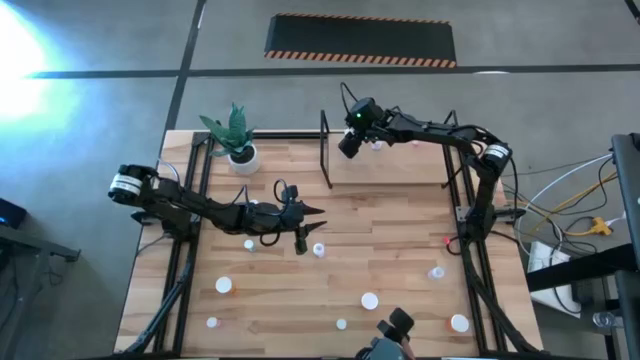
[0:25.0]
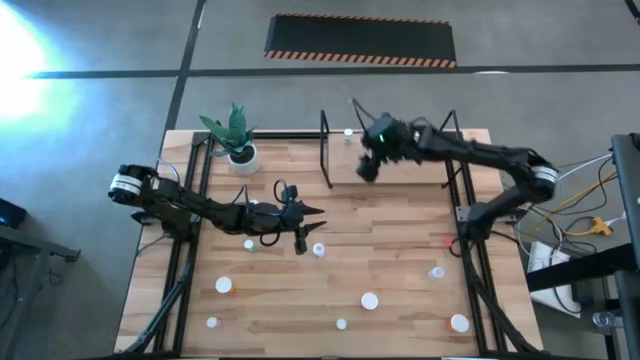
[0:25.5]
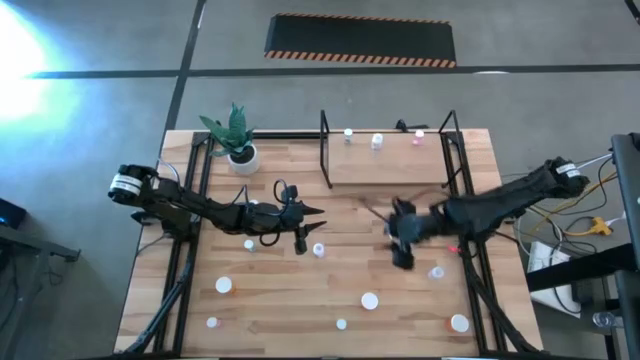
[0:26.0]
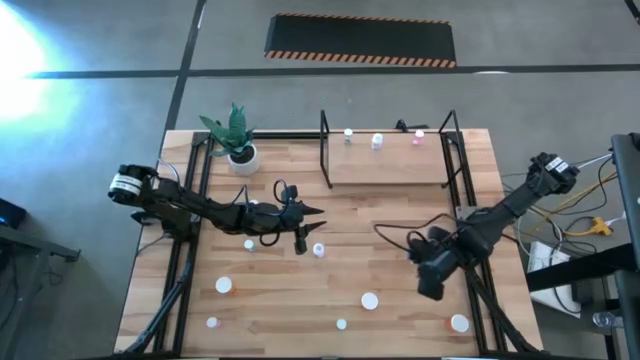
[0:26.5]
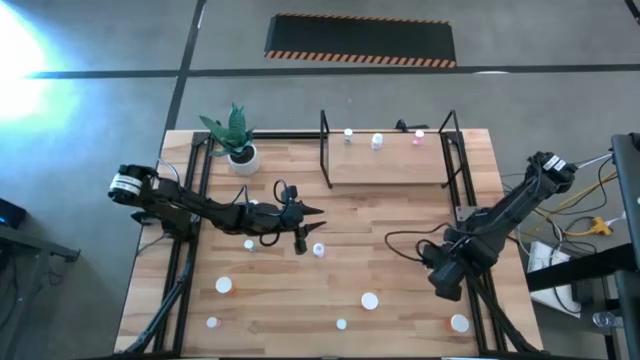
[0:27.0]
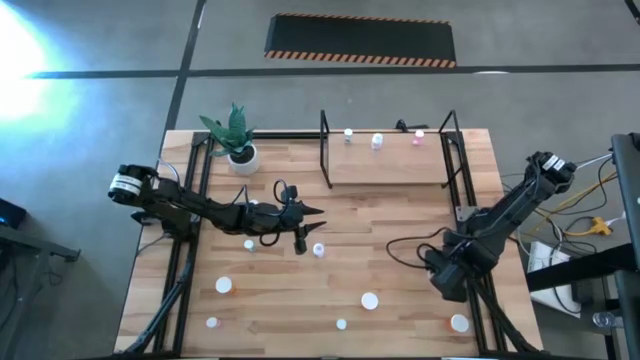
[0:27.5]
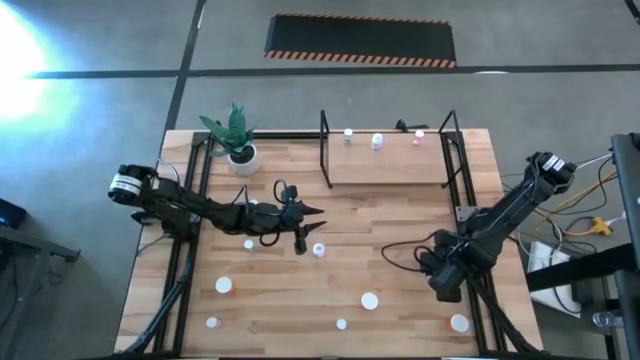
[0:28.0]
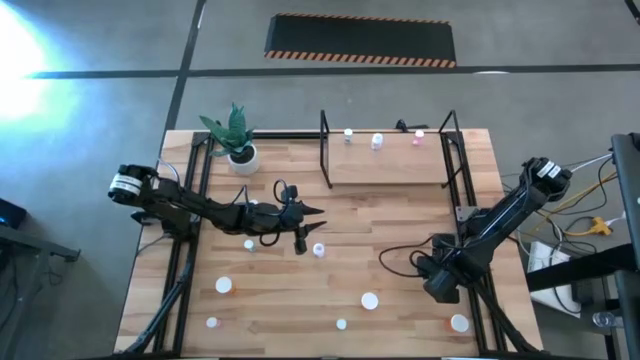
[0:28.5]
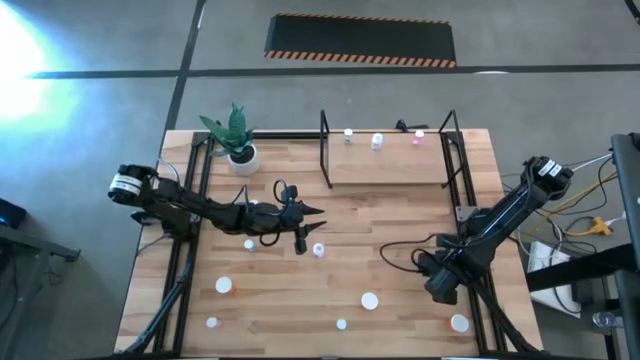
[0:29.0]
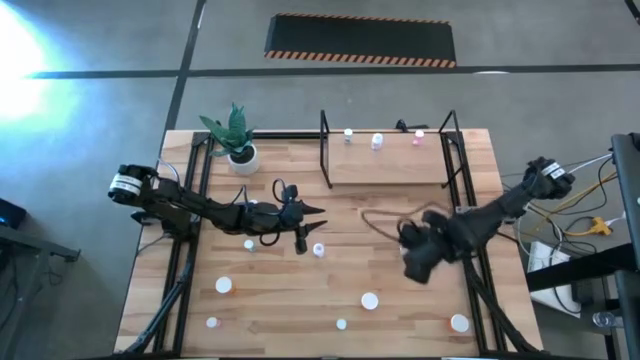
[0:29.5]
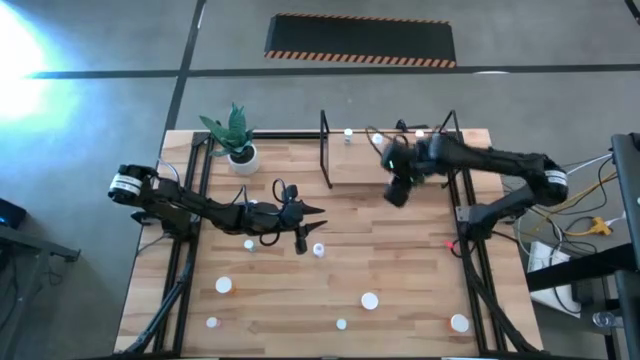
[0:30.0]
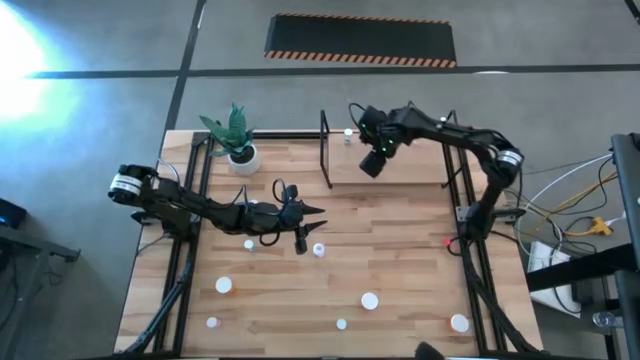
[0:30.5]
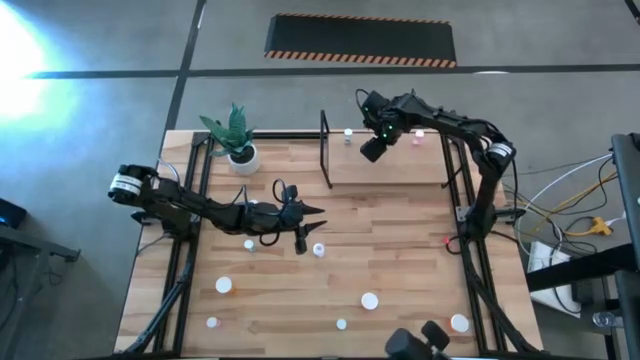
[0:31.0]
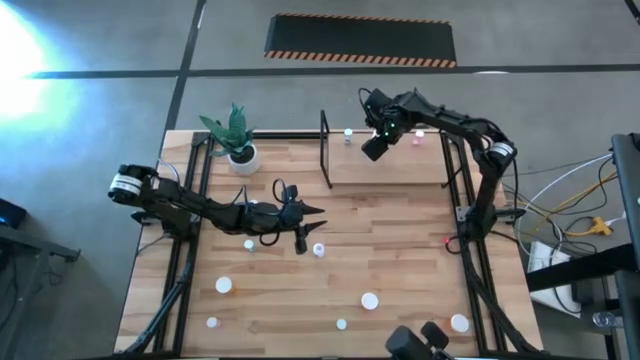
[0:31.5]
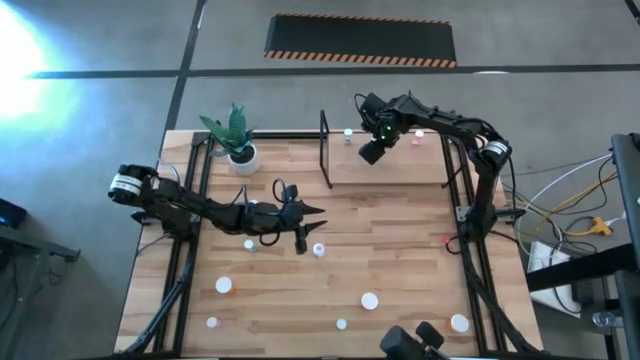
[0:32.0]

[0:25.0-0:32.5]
Task: Pick and place medicine bottles onto shelf by color
Put the right transparent pill bottle on the shelf aligned with the other transparent pill bottle

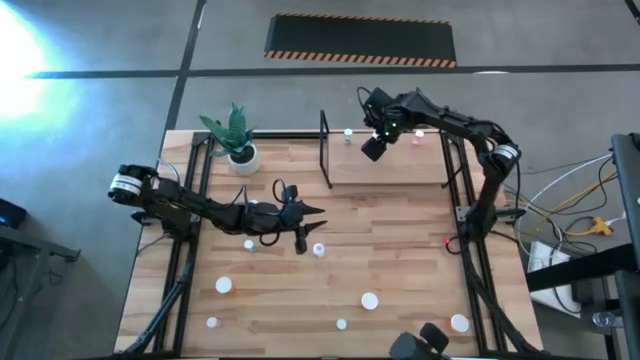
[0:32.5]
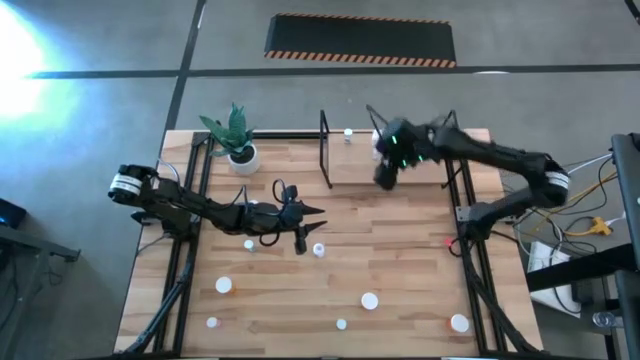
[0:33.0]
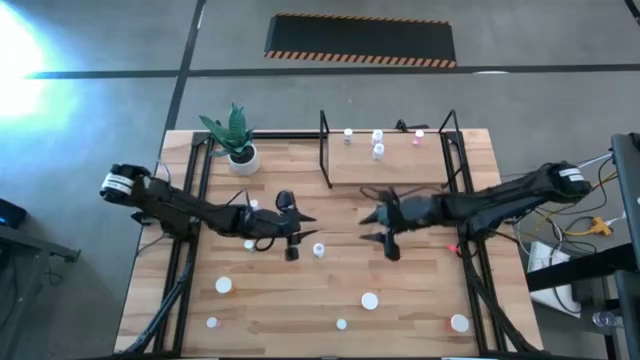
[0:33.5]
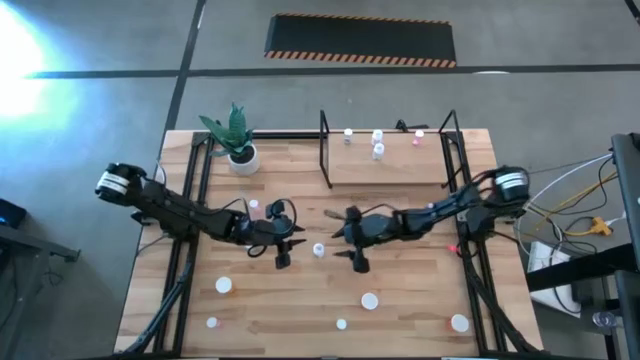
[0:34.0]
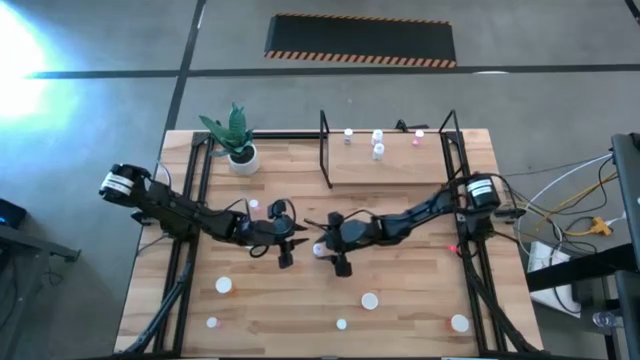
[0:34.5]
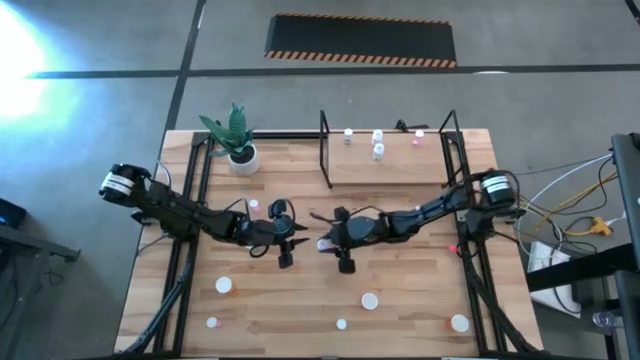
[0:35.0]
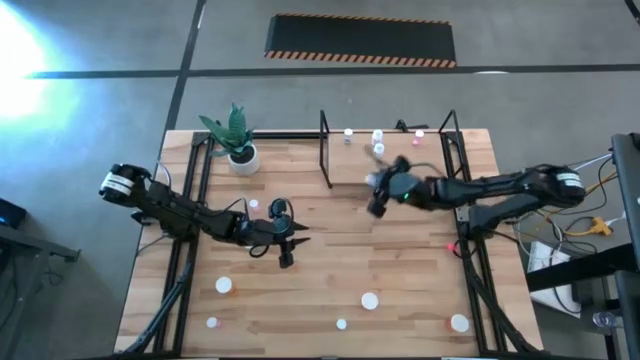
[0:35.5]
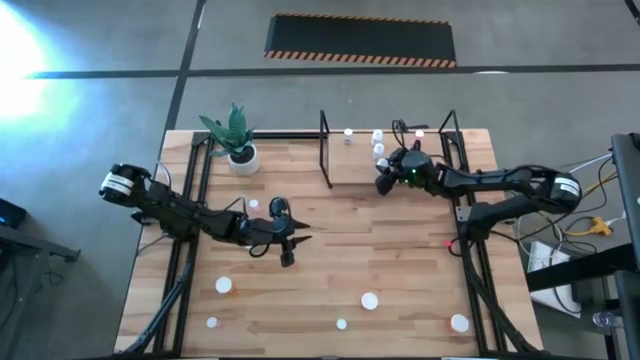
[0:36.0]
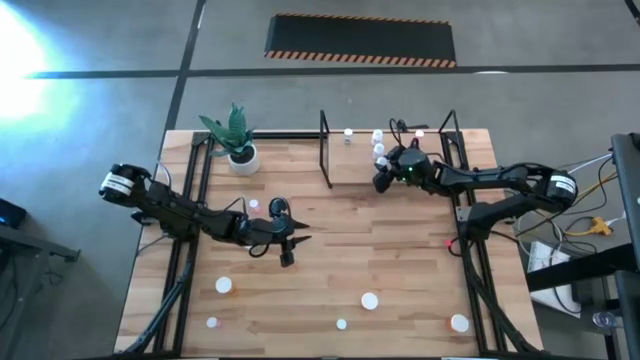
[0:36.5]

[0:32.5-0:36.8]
Put the transparent pill bottle on the shelf aligned with the other transparent pill bottle

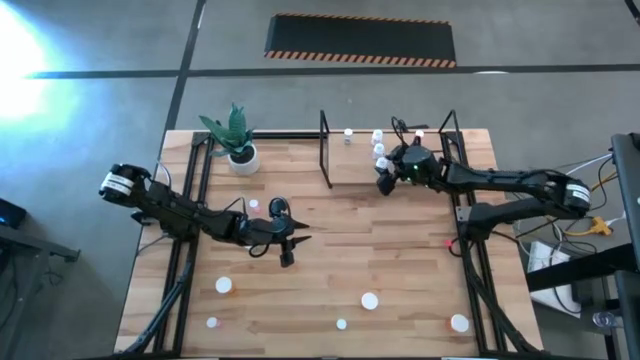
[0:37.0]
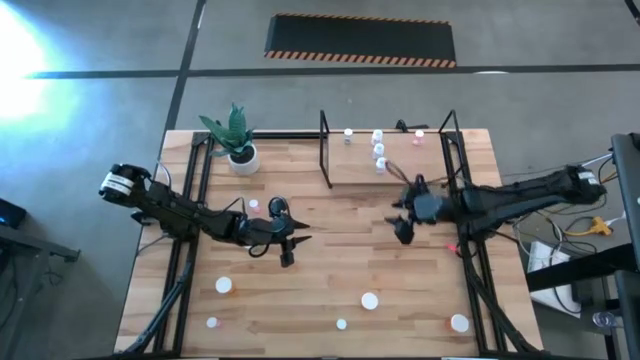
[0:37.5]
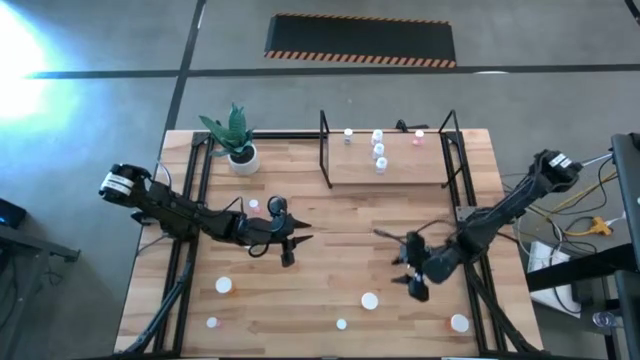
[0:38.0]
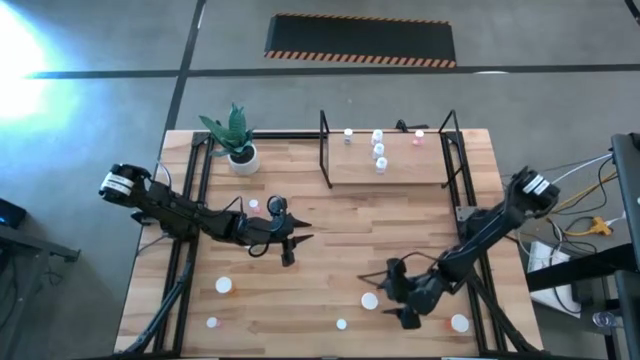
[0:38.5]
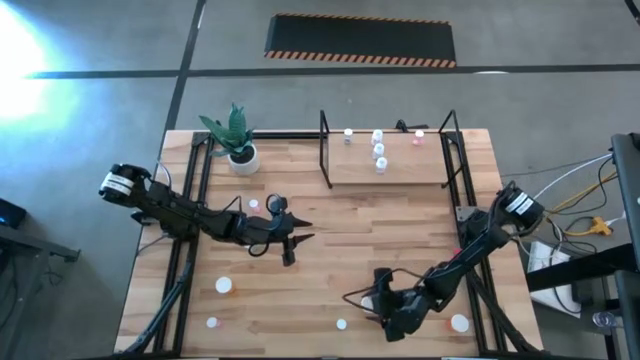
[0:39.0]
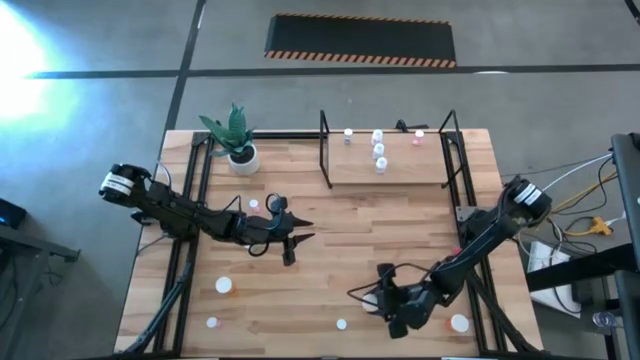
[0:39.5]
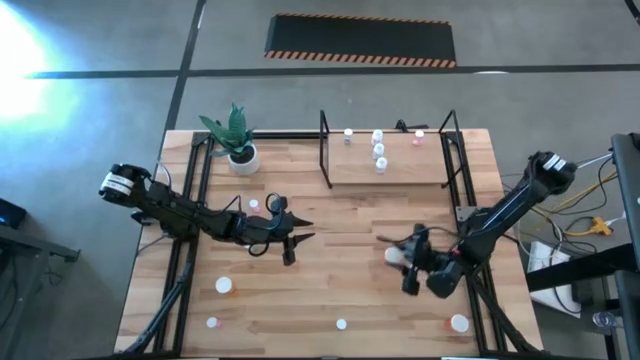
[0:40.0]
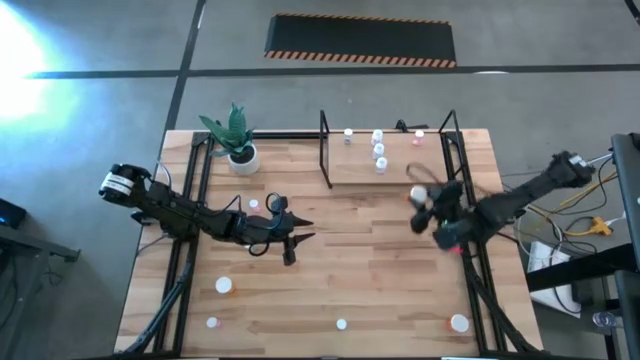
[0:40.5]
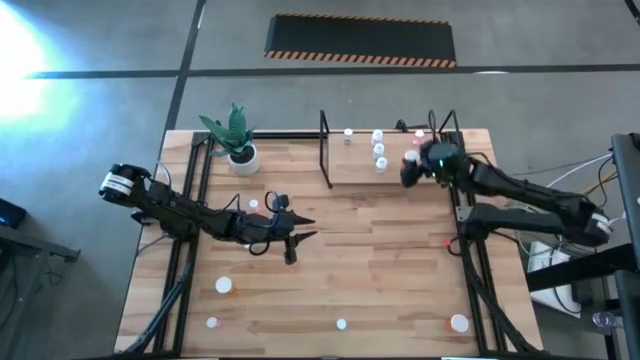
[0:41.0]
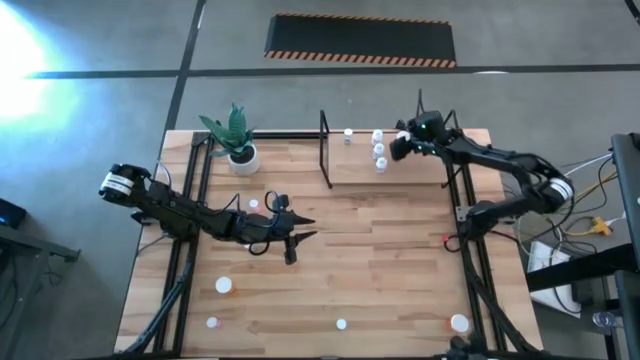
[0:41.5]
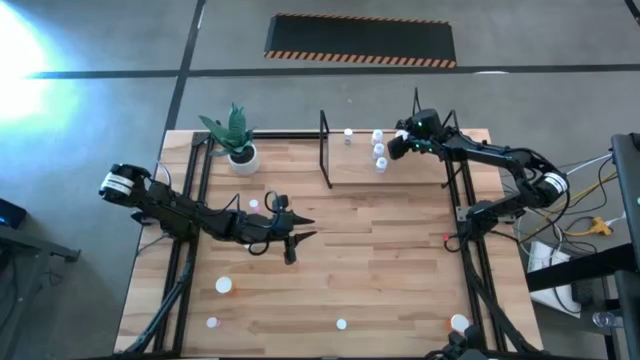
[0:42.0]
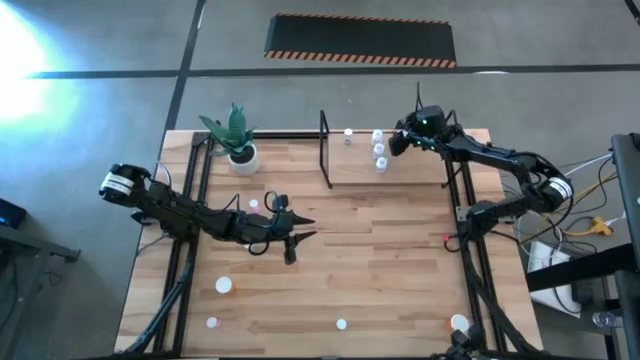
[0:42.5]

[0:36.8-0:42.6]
Put the middle orange pill bottle on the shelf

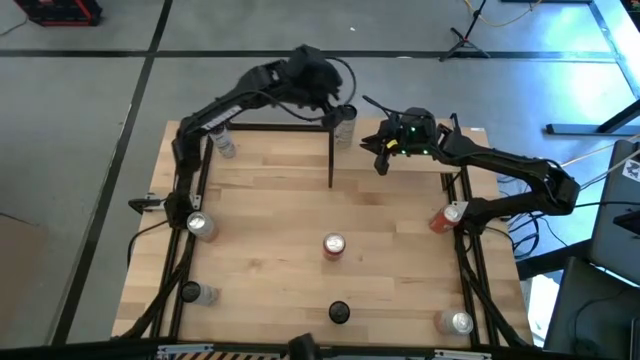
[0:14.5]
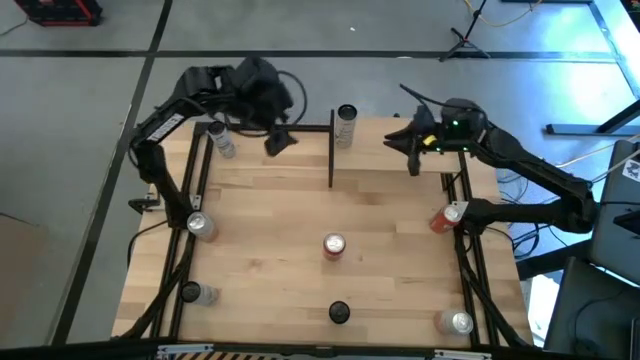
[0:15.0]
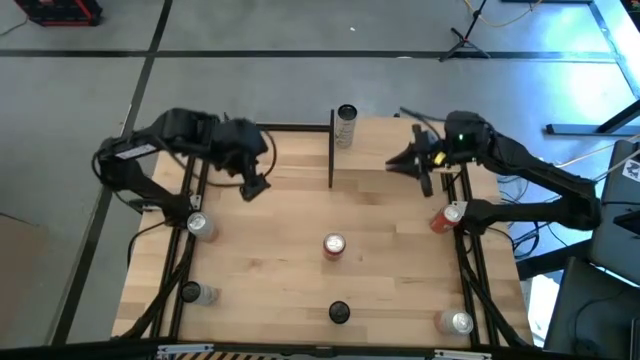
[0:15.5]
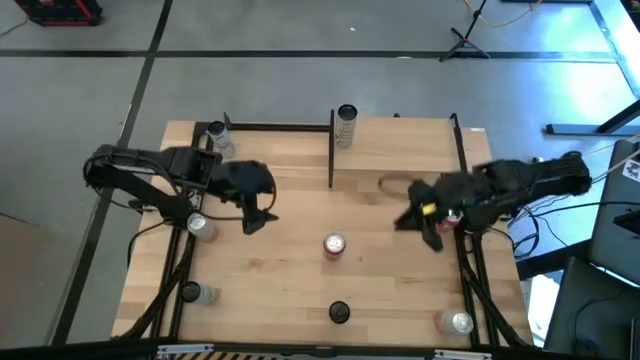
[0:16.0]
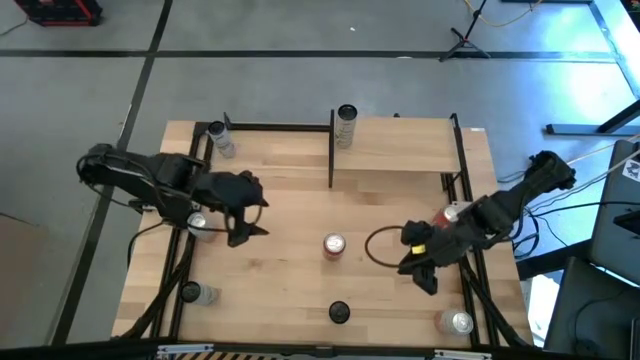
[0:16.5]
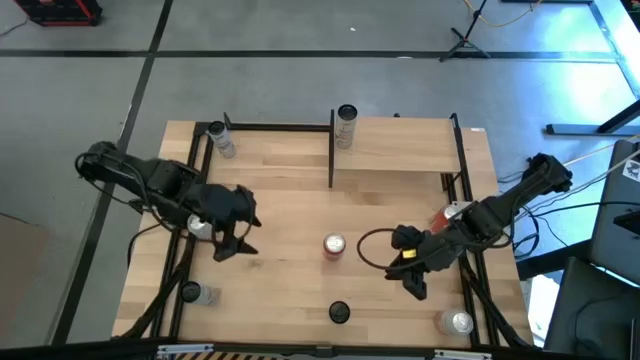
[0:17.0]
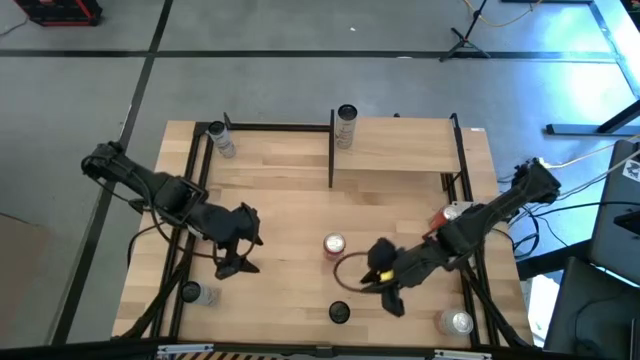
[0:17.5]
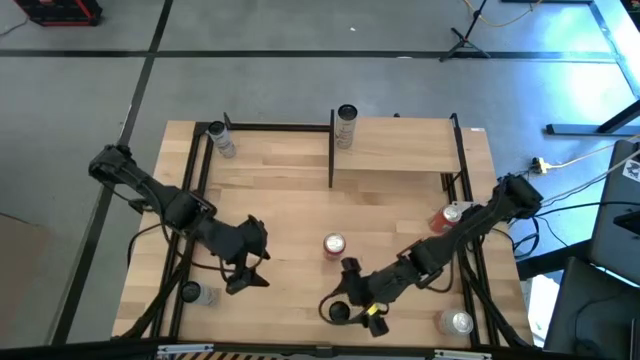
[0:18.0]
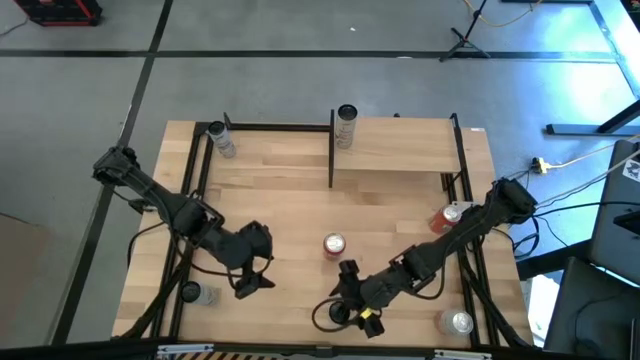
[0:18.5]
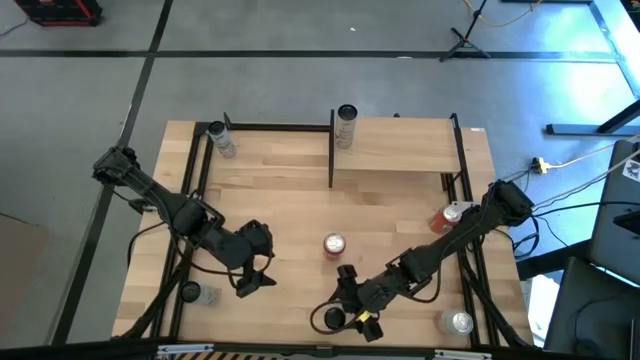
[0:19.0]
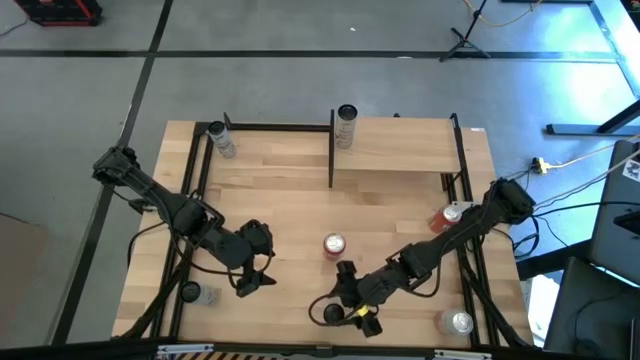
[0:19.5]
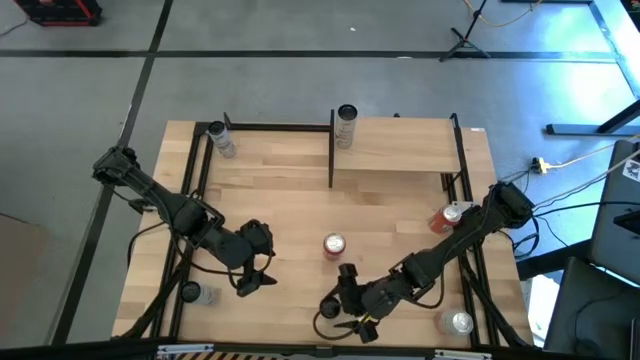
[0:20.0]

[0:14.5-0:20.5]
Task: Place canned beverage on shelf
Put the white yellow soda can on the shelf aligned with the other white yellow soda can
